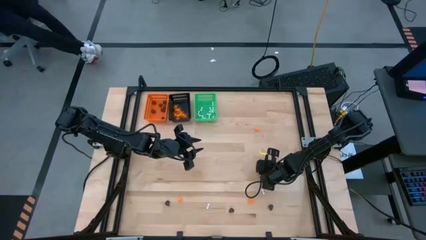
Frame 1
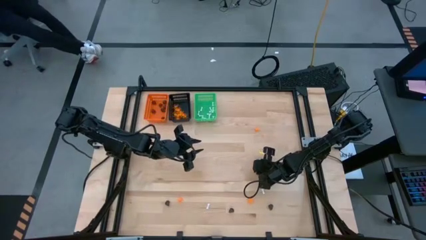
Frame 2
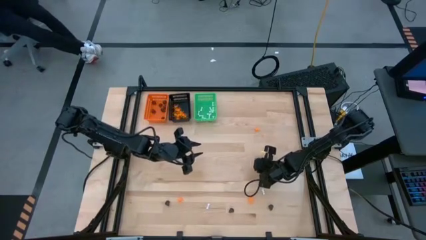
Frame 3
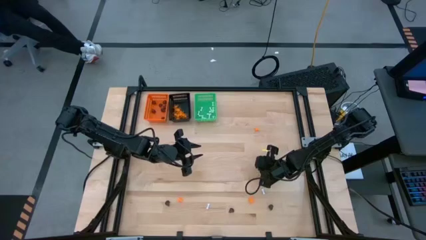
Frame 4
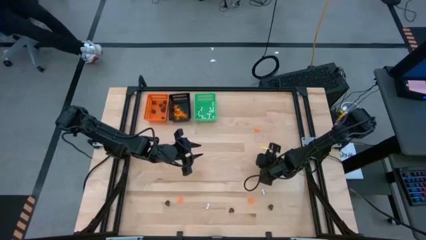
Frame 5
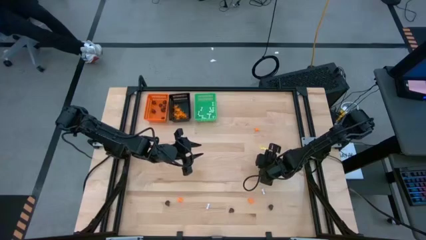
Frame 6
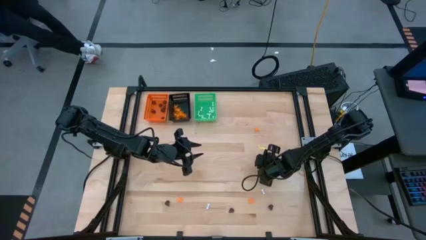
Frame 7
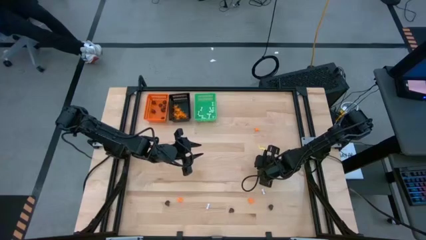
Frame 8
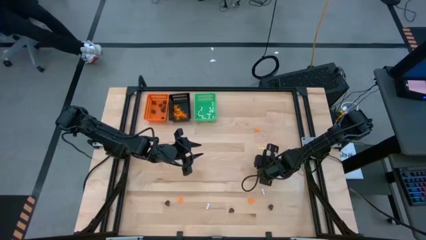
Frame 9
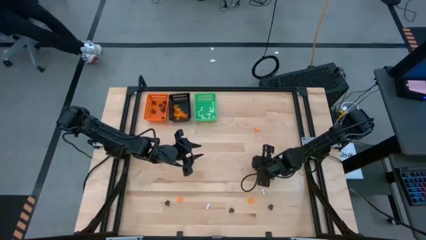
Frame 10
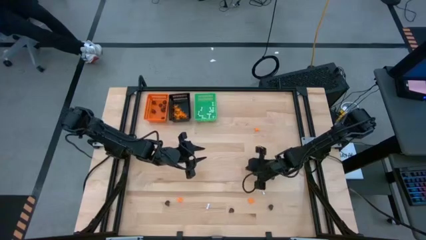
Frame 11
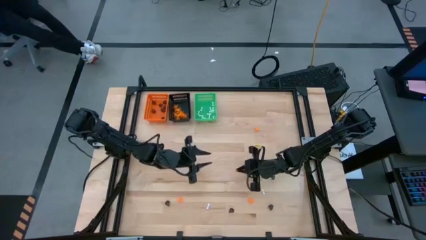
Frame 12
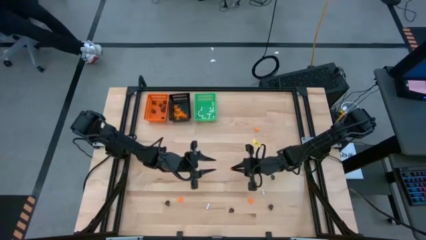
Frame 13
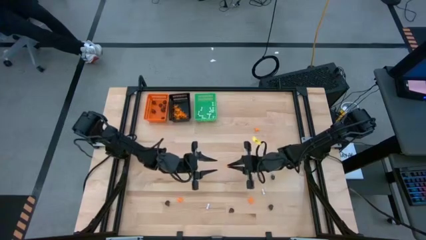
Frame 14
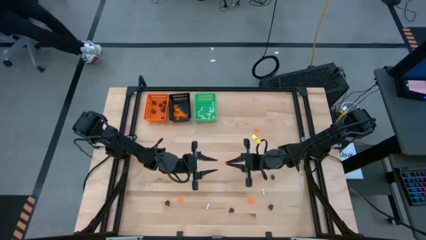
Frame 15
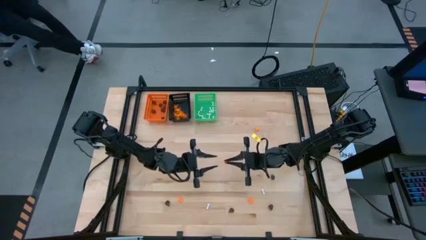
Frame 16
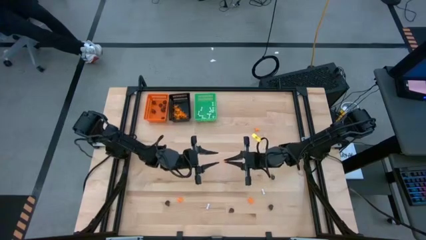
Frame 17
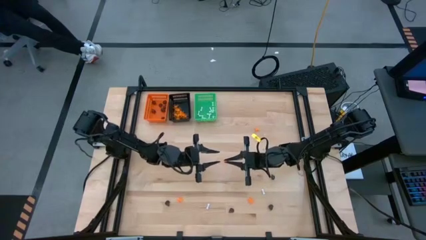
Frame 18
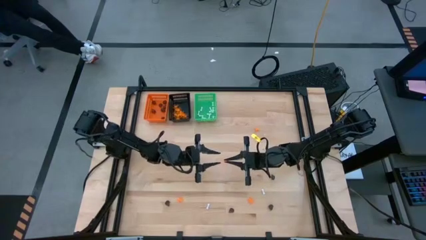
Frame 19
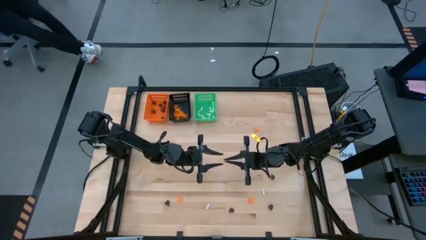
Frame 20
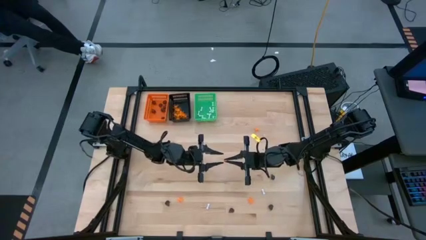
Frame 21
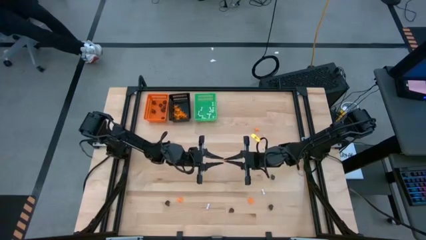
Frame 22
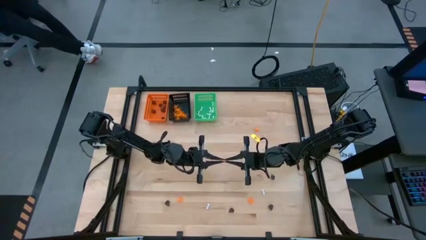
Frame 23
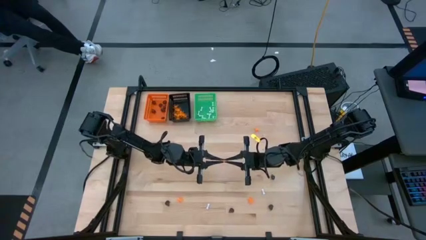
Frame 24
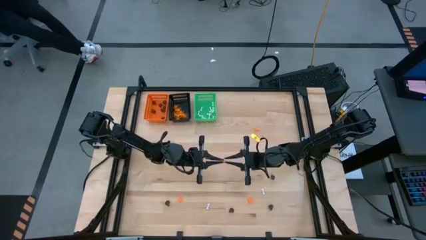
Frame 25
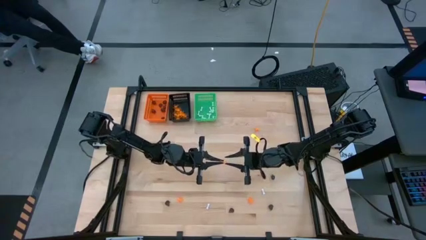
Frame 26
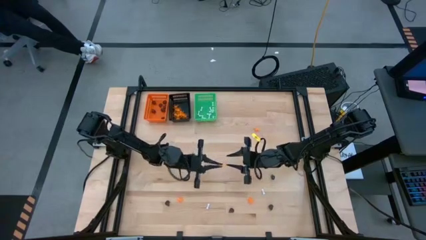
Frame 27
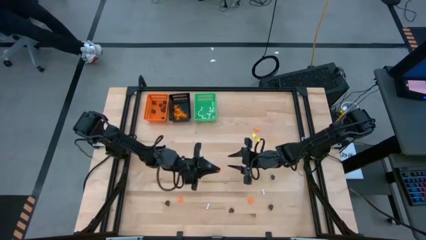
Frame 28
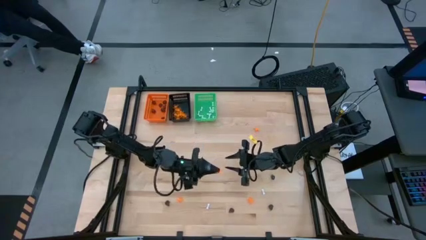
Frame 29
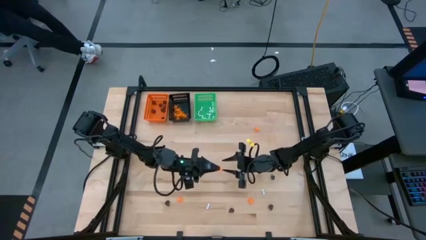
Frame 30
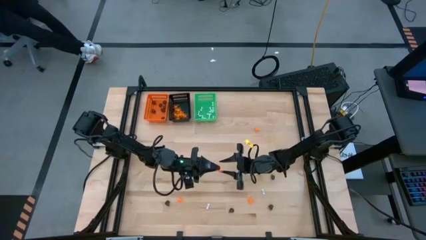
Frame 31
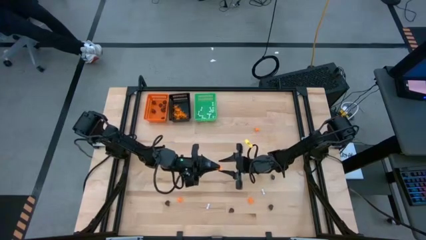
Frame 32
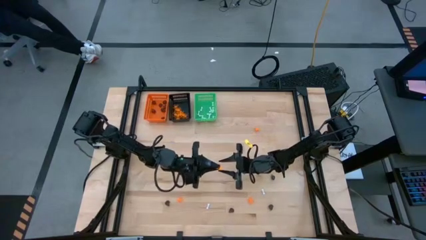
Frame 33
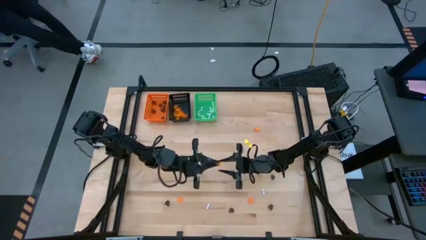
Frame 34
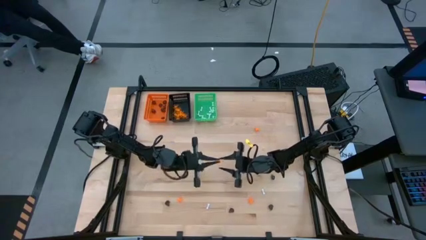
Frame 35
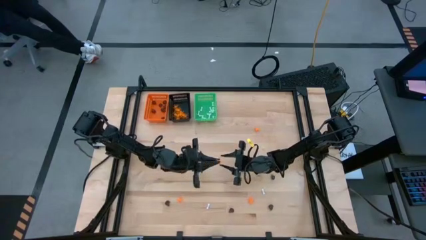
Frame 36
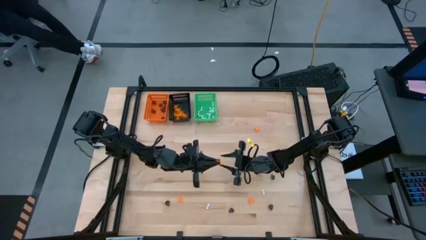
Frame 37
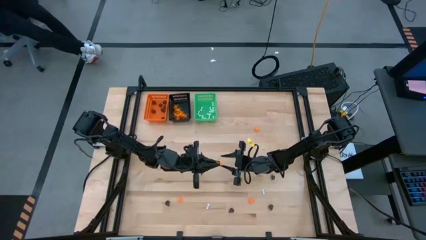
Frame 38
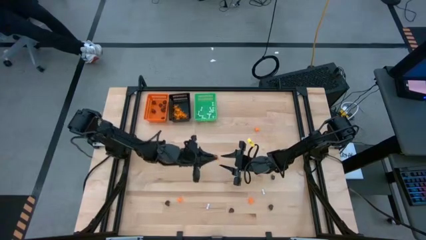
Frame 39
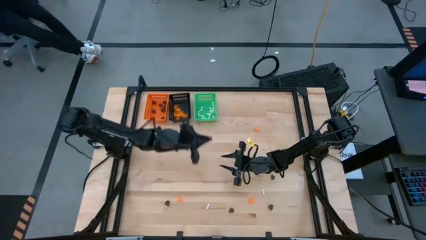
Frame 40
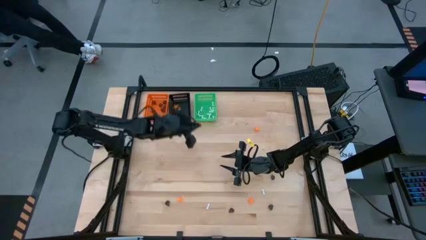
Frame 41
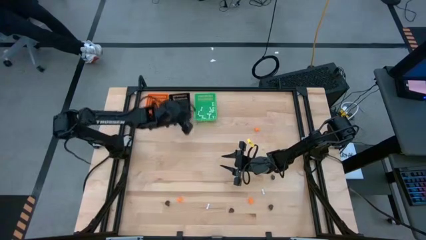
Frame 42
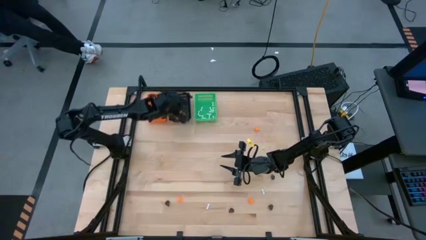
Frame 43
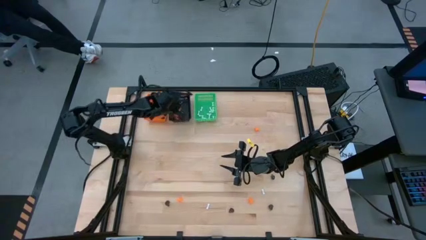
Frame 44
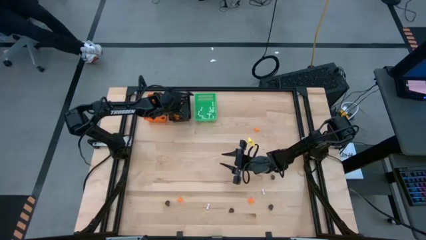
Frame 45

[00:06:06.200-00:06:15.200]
Task: Sort Halloween decoration
Put the orange spider toy into the black bin

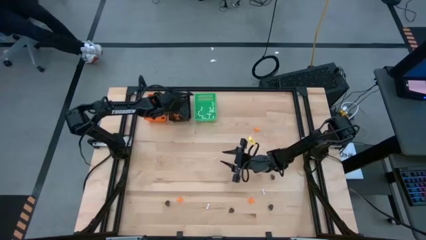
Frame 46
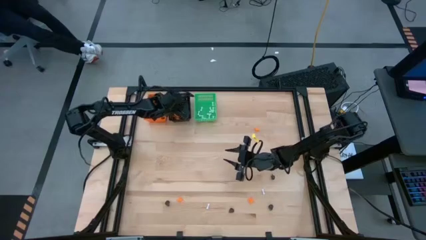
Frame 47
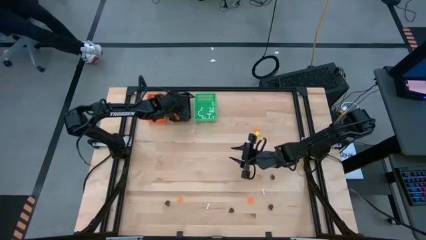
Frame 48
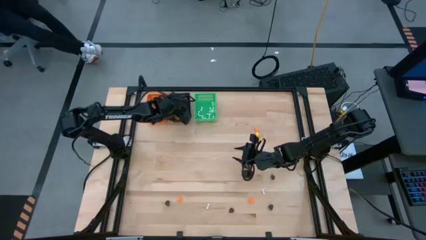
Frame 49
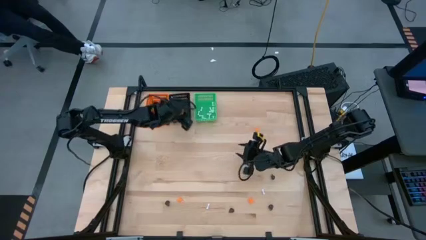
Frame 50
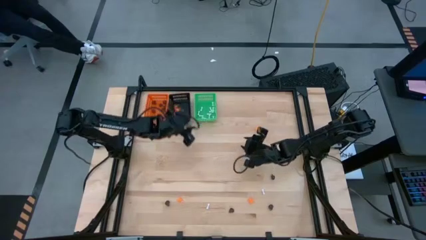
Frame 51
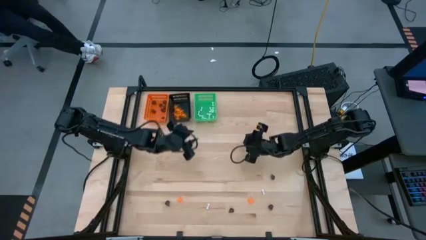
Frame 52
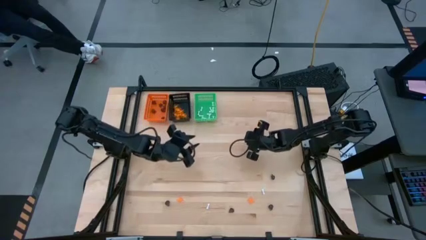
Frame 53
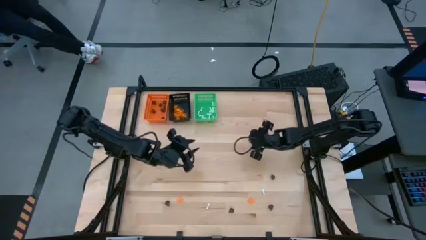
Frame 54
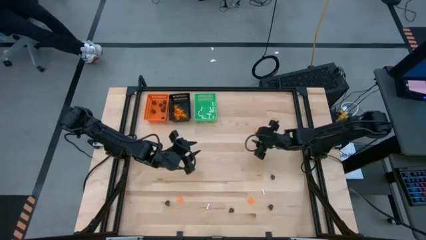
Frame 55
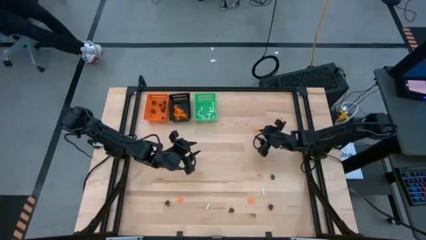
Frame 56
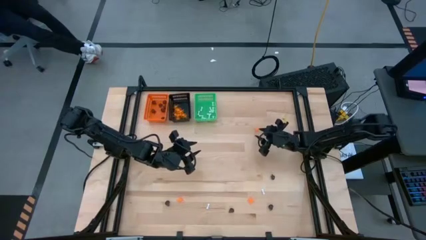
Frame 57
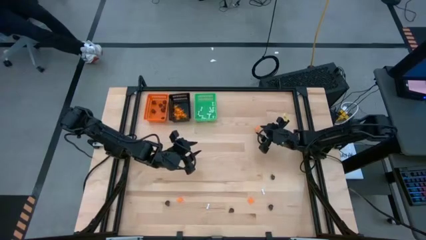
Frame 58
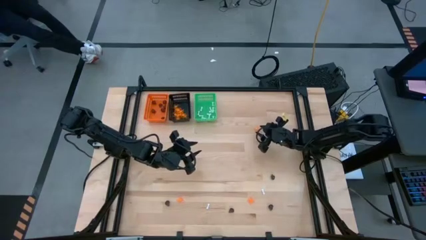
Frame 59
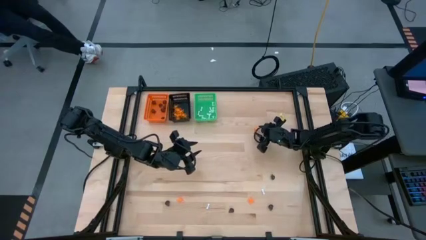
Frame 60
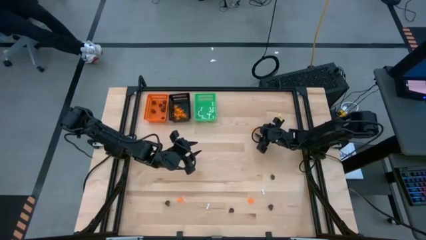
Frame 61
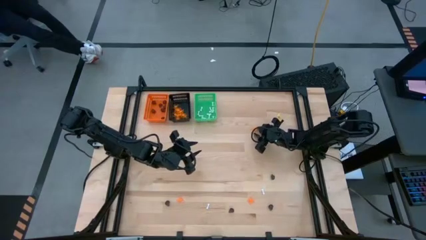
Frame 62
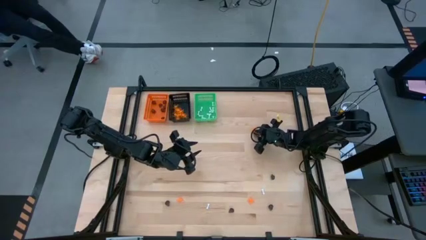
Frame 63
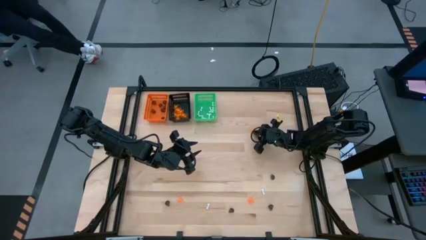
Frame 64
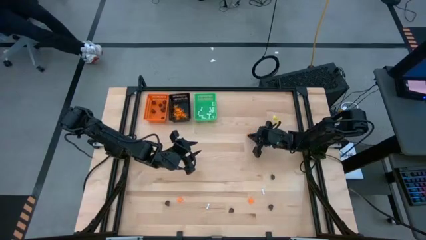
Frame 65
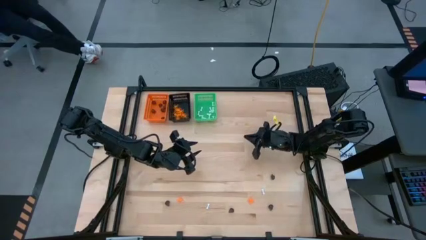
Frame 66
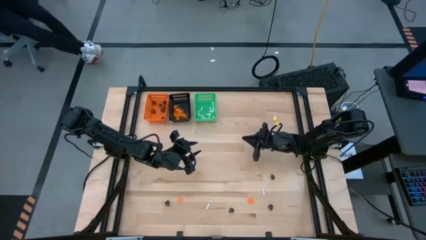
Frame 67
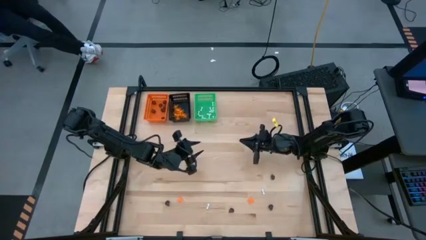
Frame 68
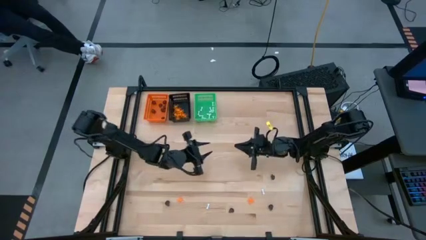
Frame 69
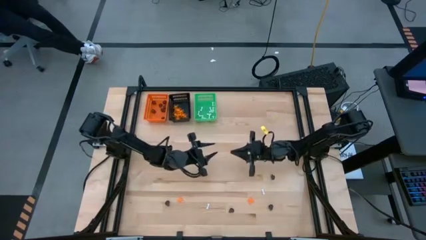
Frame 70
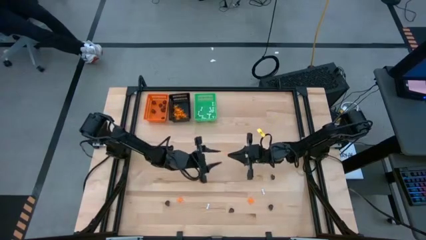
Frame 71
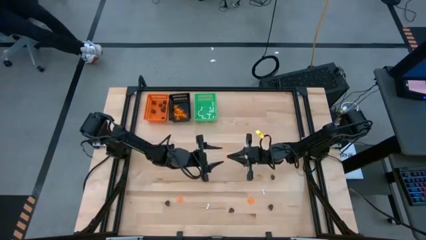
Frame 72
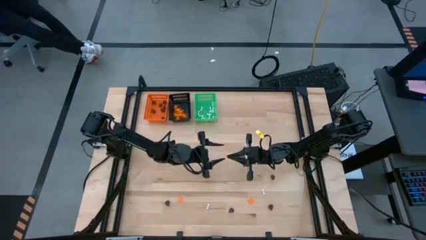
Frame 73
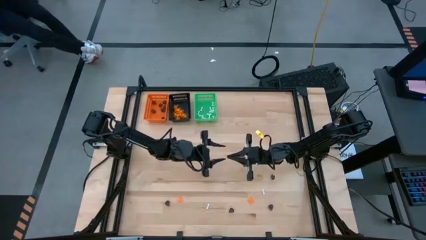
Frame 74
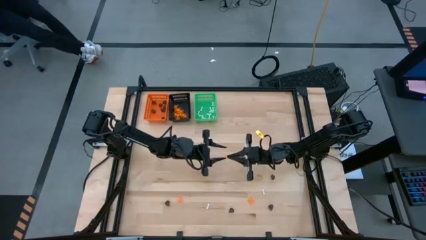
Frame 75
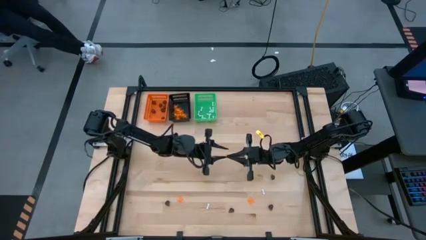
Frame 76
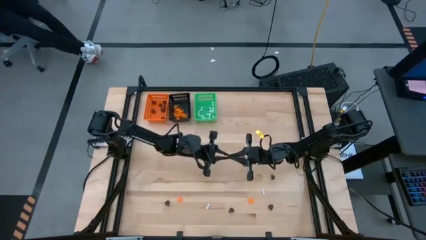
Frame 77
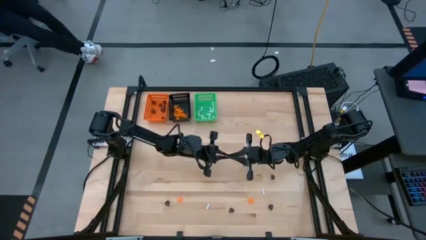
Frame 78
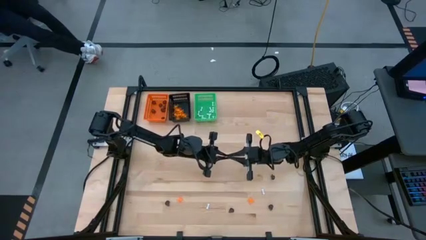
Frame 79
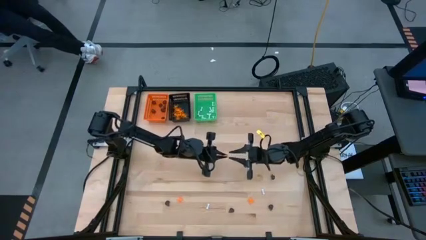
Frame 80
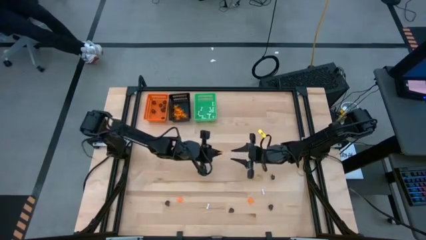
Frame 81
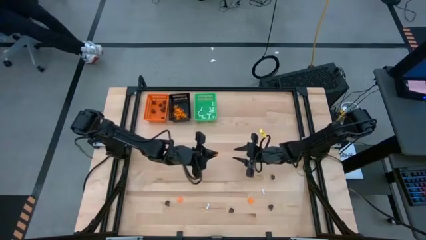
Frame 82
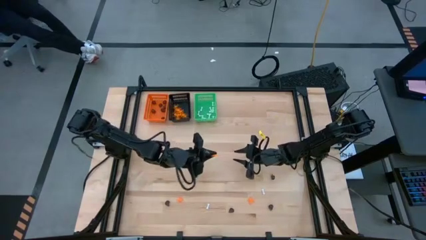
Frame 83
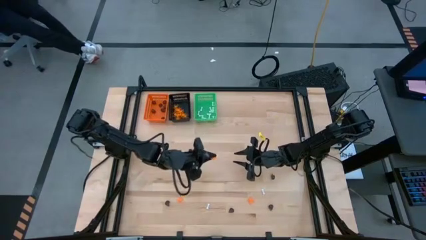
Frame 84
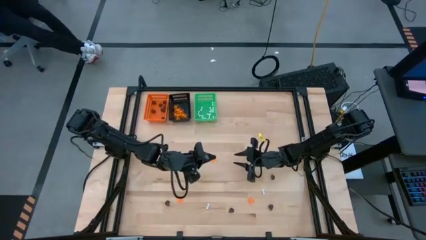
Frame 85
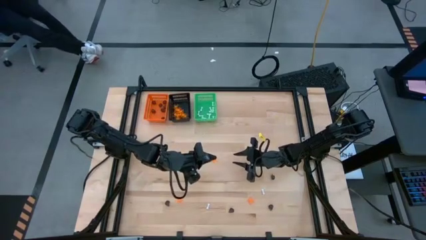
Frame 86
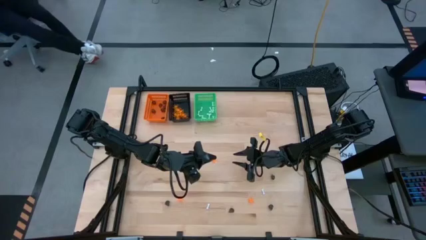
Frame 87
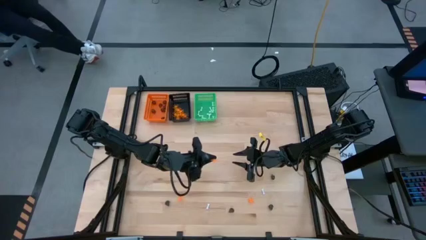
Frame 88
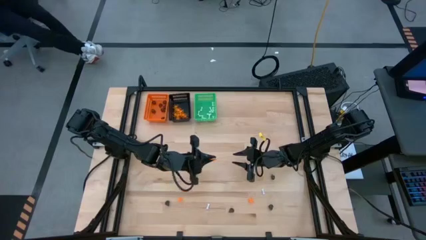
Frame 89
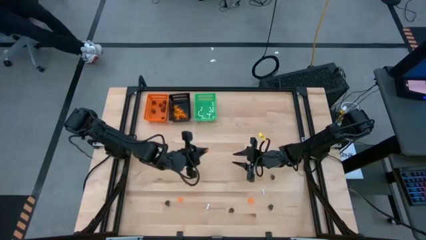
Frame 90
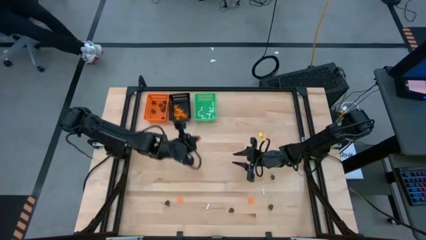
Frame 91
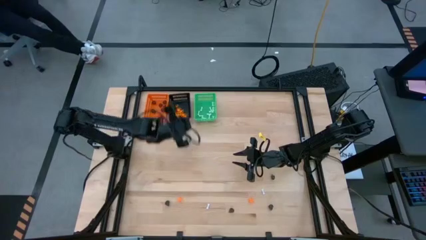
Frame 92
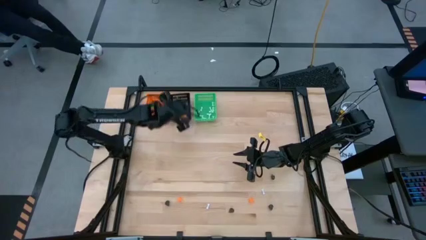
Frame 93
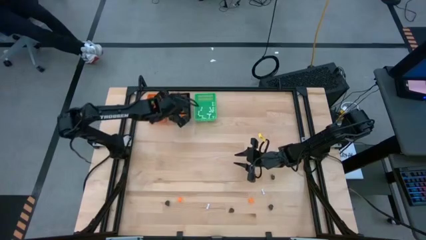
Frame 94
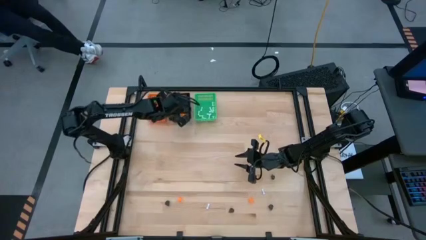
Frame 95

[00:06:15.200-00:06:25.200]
Put the orange spider toy into the black bin
